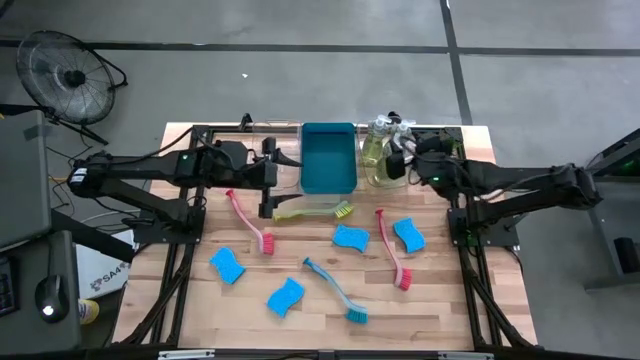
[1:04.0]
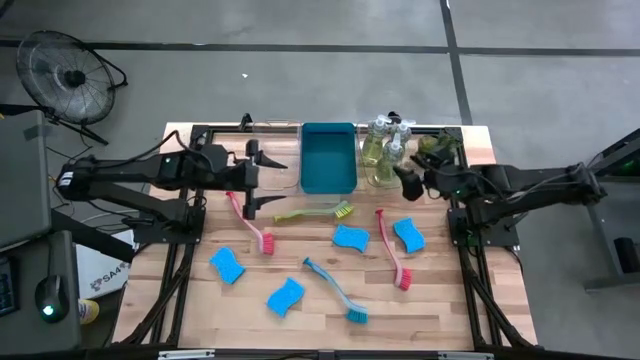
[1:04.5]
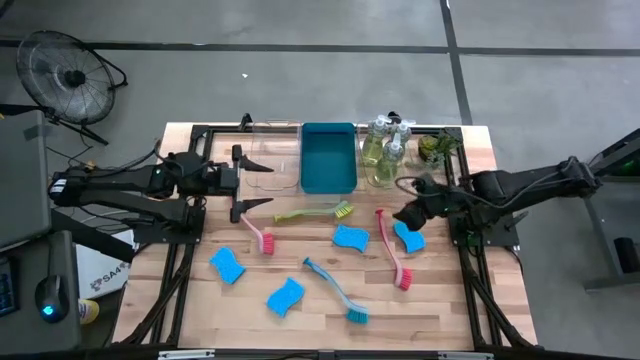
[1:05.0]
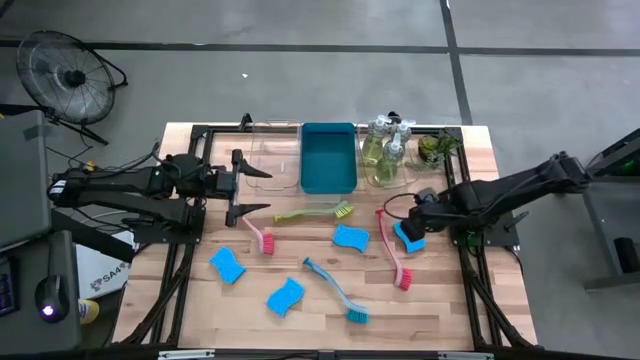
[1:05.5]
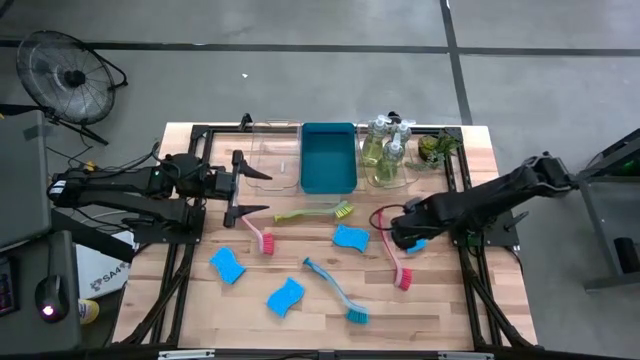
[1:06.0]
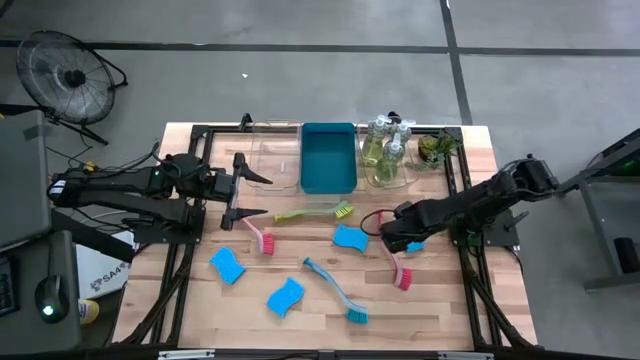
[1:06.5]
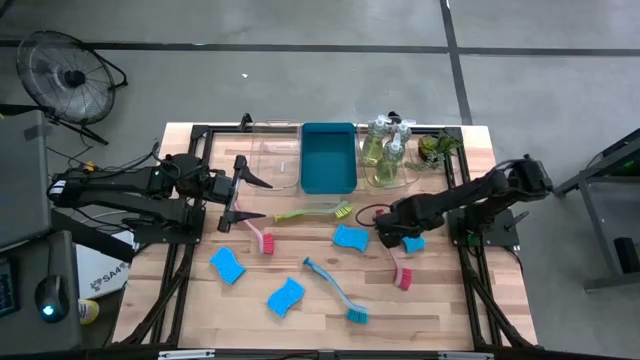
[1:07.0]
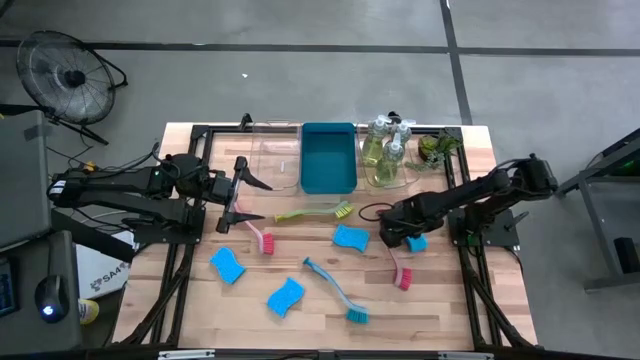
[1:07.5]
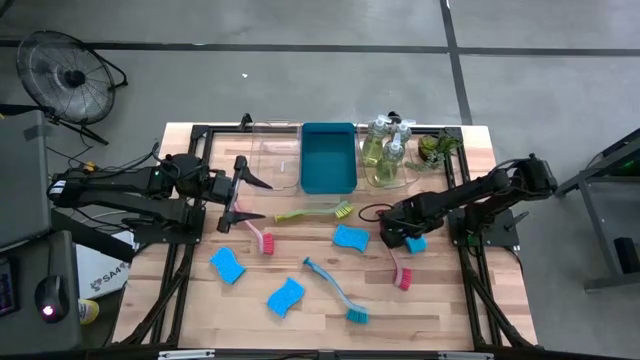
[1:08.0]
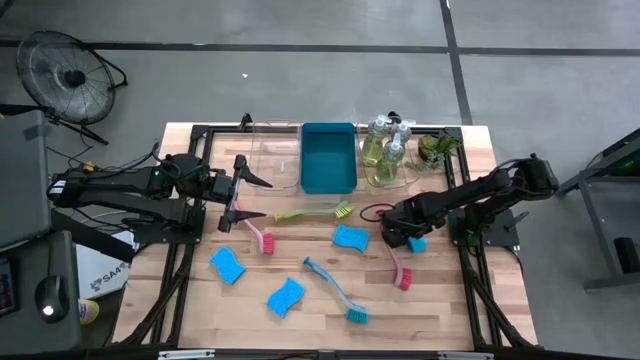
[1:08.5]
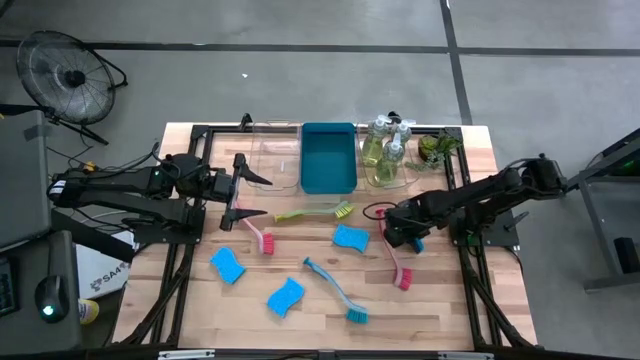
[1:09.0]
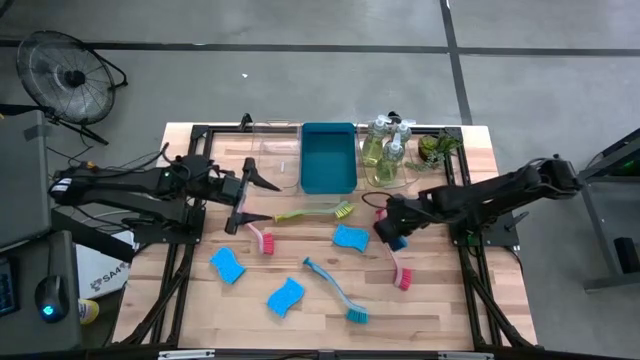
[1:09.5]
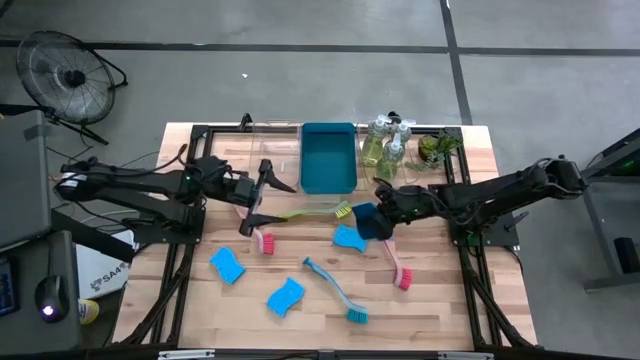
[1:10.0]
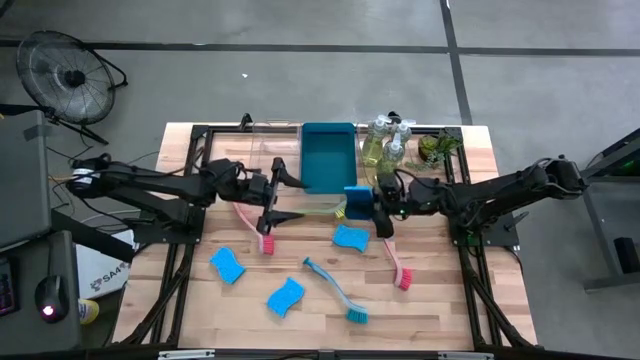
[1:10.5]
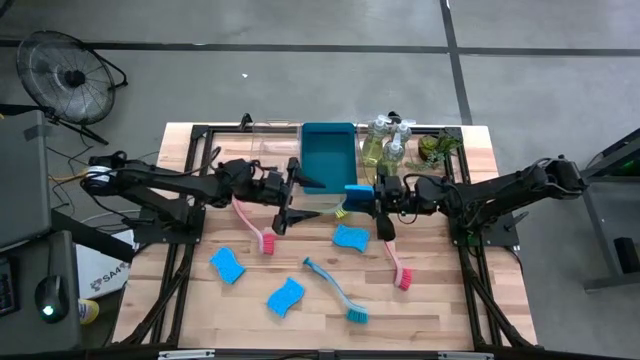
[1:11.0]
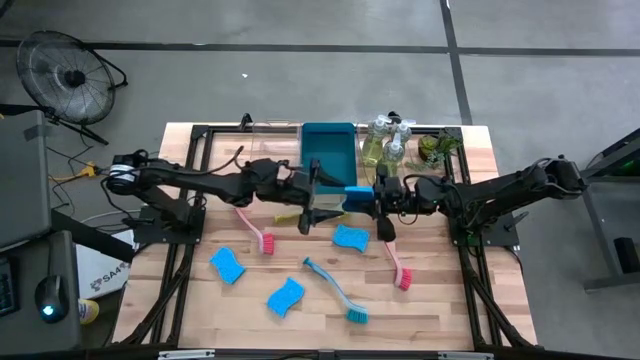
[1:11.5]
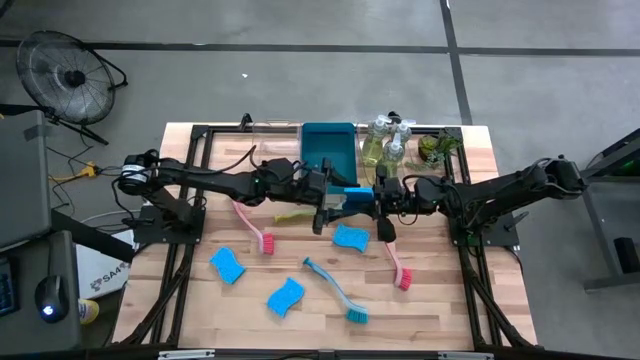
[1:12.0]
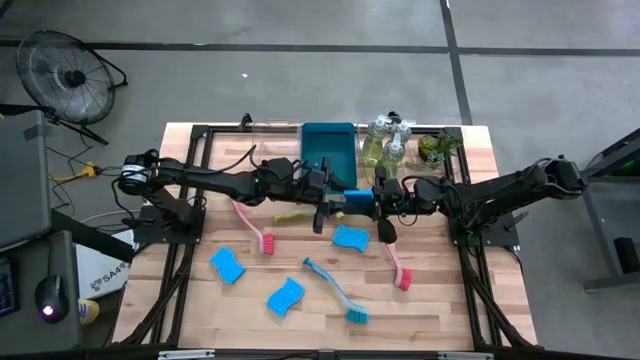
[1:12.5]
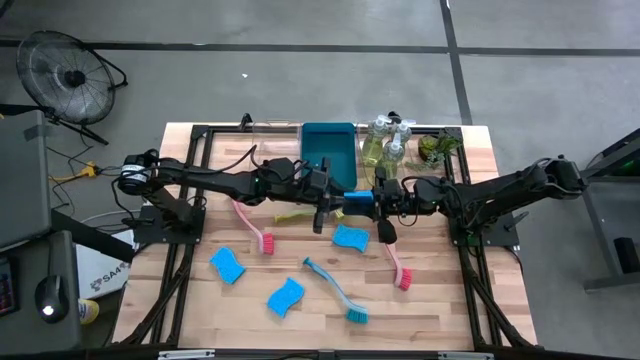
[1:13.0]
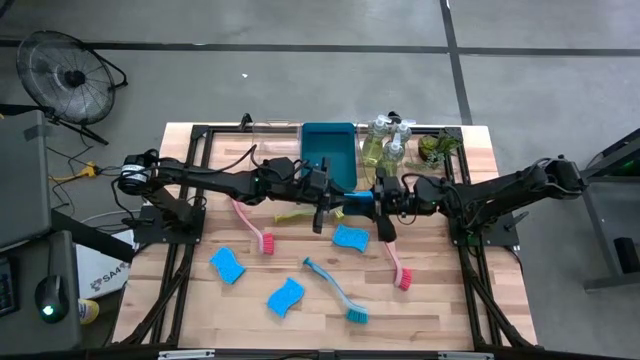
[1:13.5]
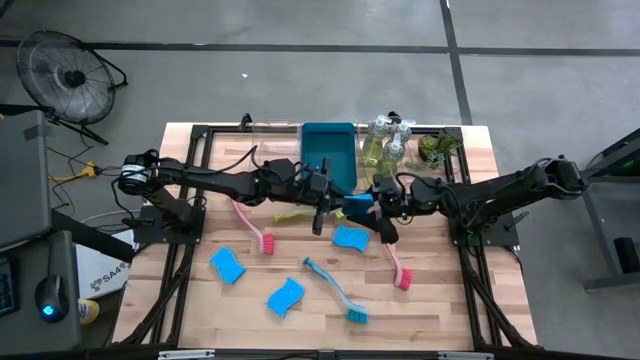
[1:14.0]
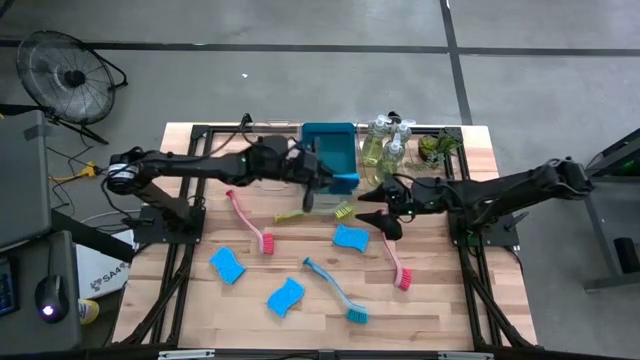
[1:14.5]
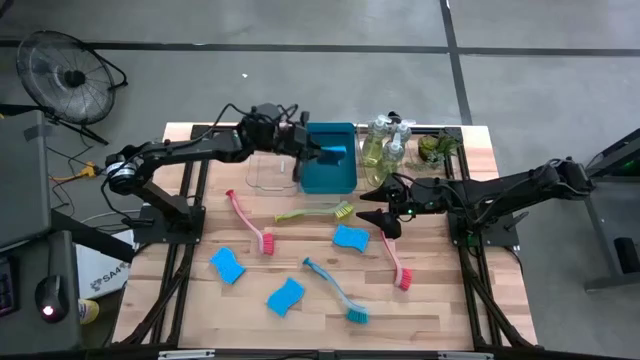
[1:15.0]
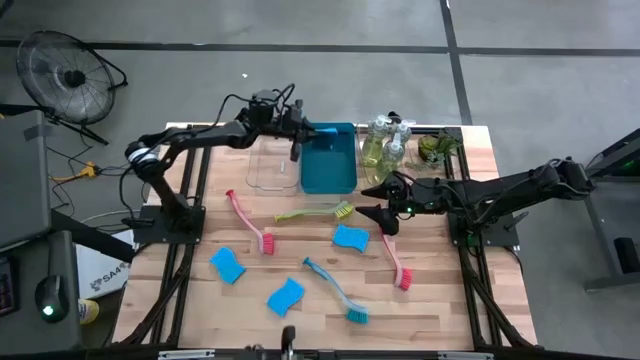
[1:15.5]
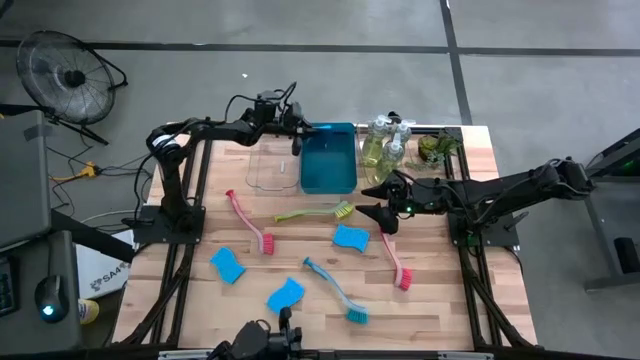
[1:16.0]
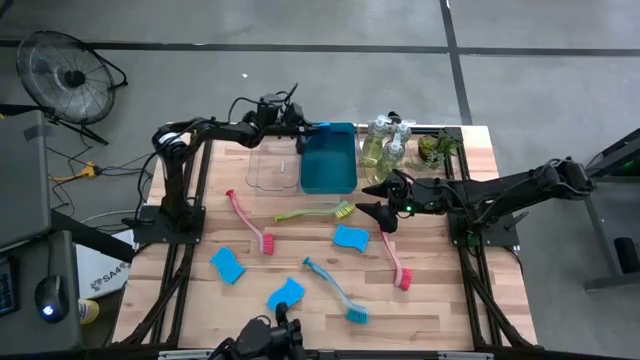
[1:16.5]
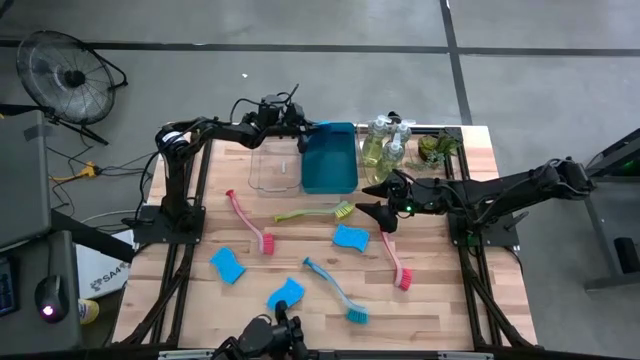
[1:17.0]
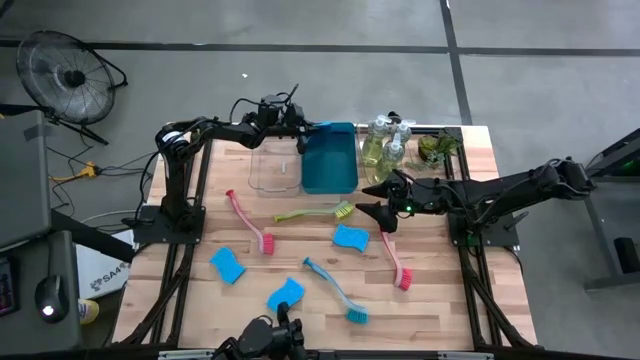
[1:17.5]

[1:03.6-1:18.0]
Task: Pick & Place Kitchen Sink Supplies
Put the blue sponge into the blue bin

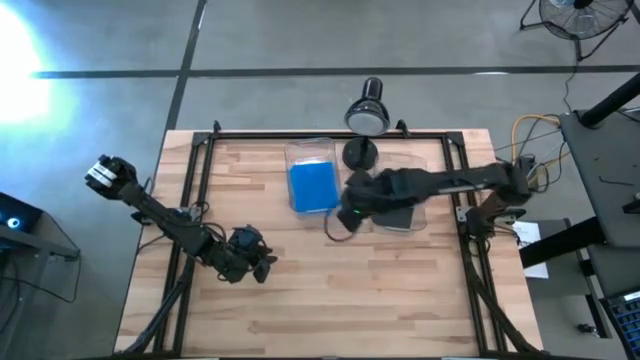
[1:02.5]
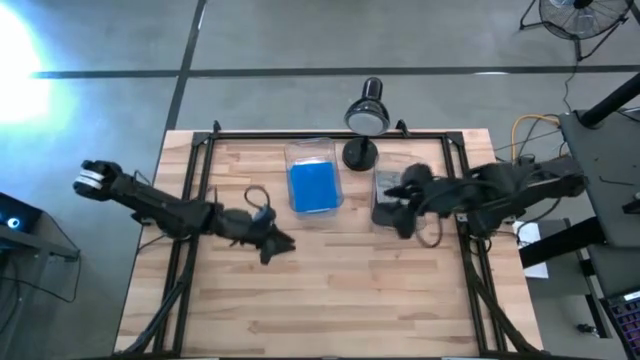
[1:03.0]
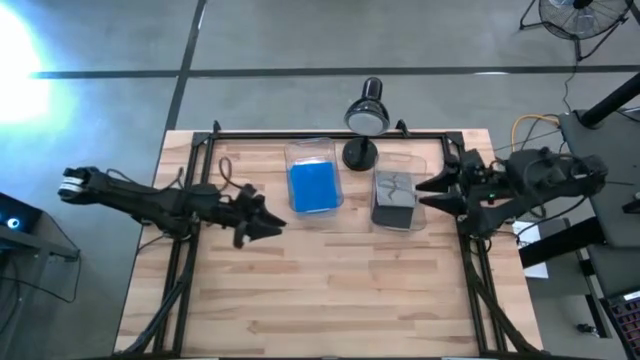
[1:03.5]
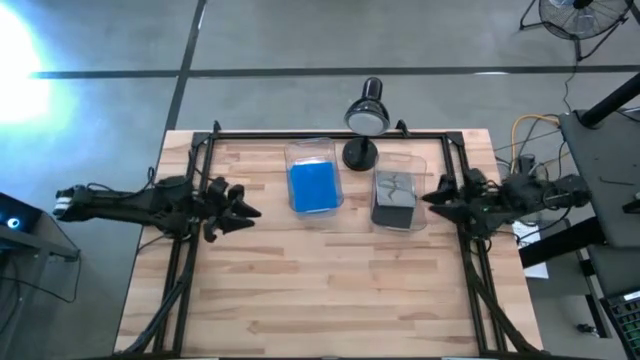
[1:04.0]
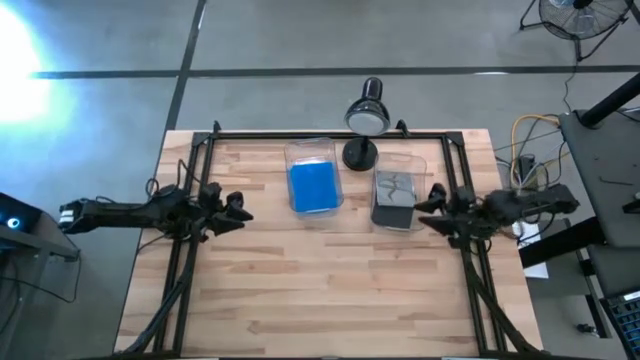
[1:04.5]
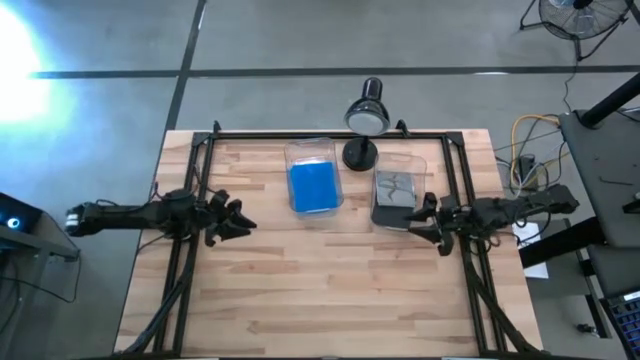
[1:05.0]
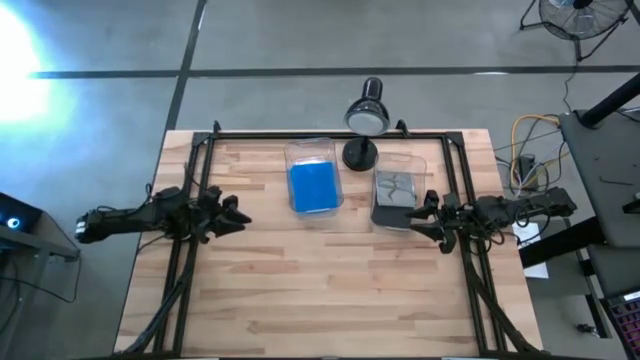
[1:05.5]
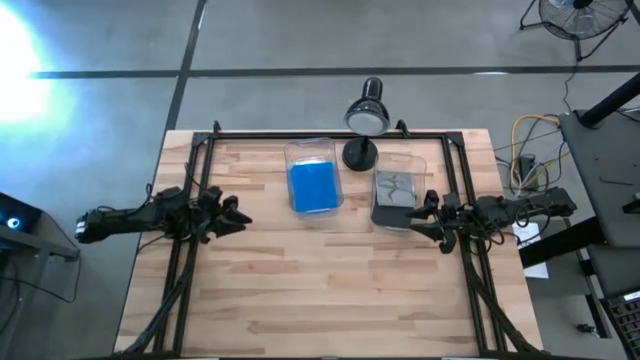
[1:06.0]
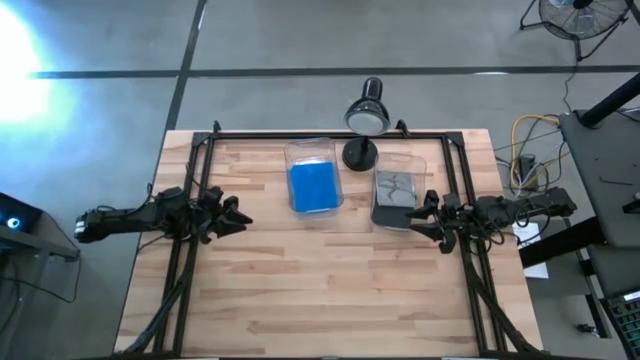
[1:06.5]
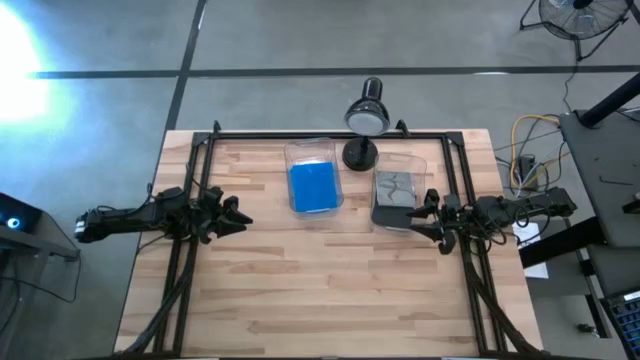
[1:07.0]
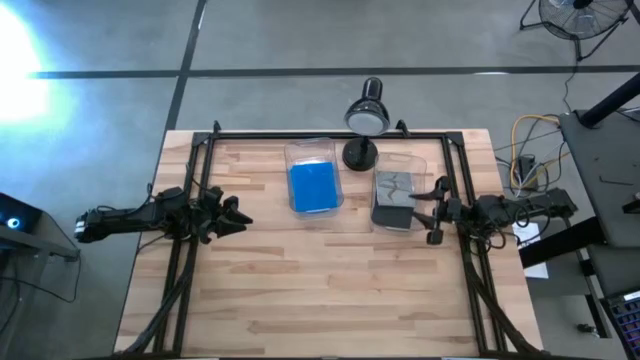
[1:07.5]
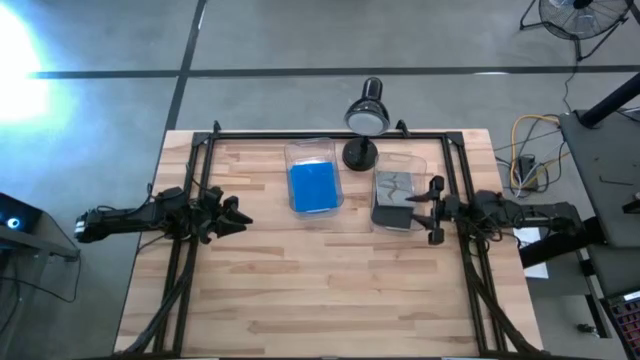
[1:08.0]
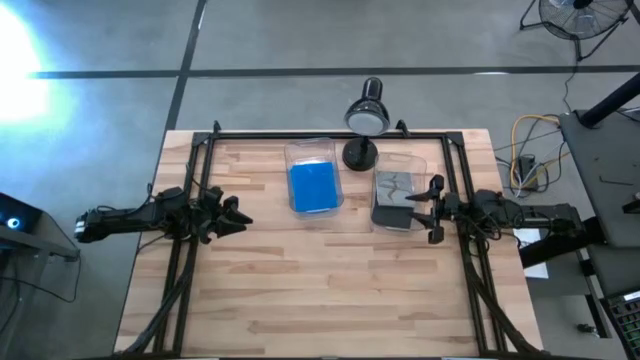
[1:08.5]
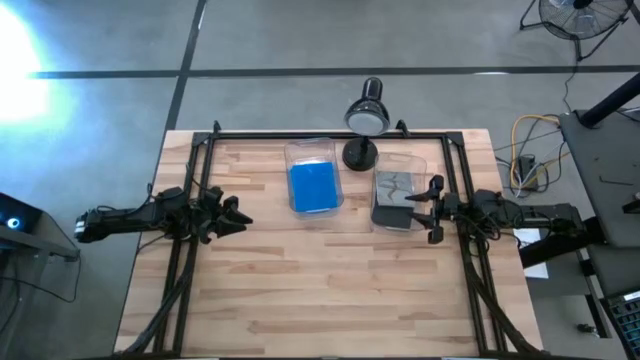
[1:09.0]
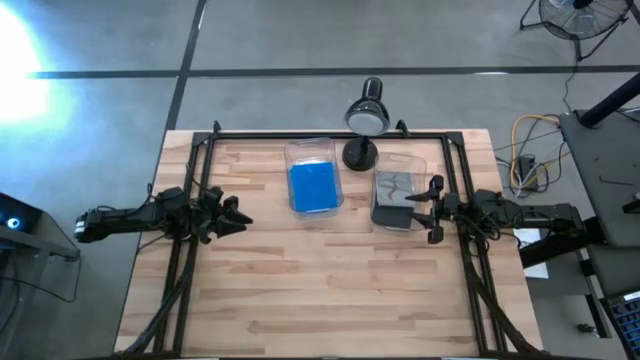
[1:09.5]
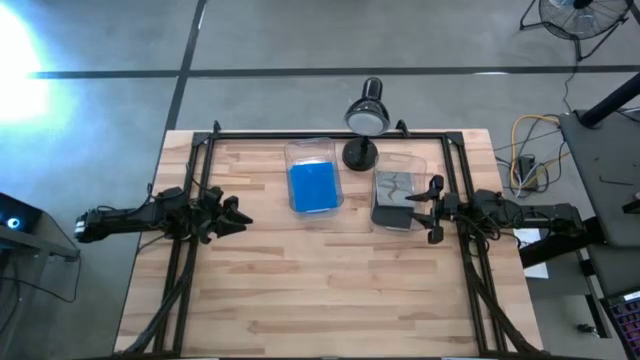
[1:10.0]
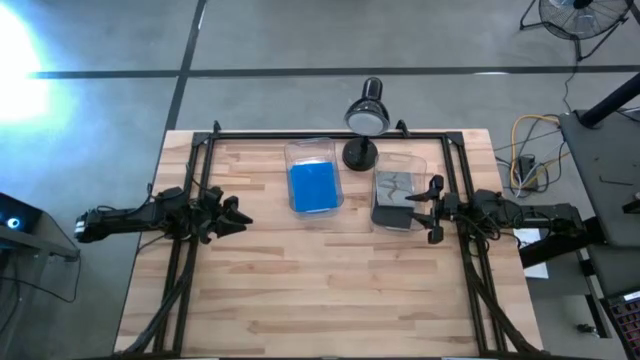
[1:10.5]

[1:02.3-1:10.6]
Task: Pick & place jewel cases by type
Return to Home Position
